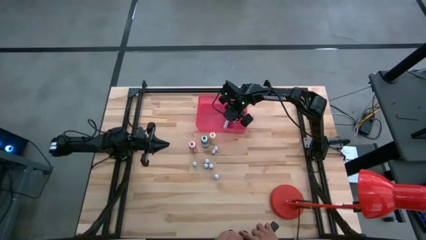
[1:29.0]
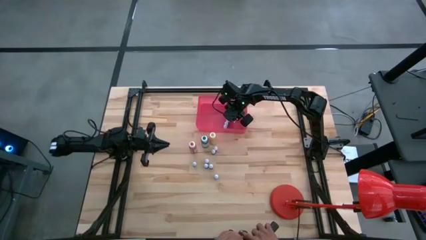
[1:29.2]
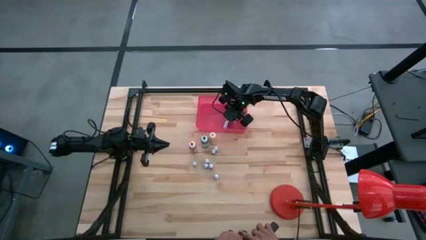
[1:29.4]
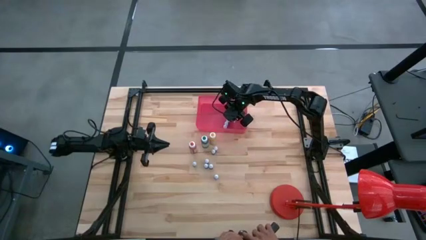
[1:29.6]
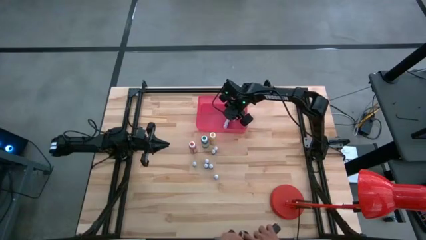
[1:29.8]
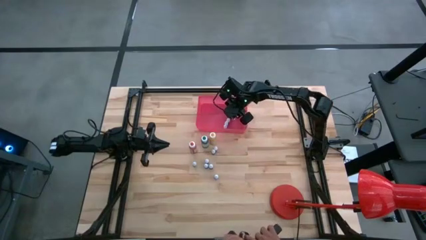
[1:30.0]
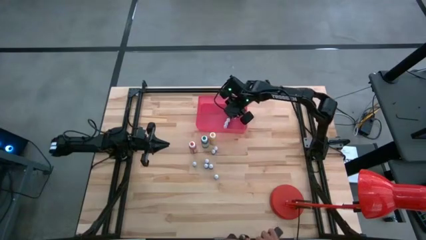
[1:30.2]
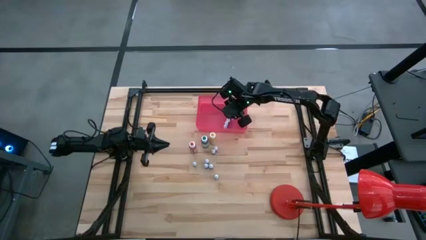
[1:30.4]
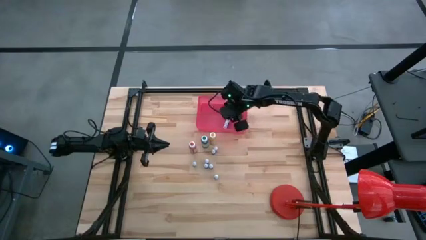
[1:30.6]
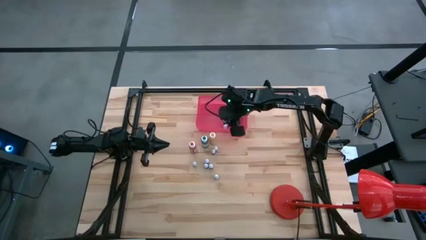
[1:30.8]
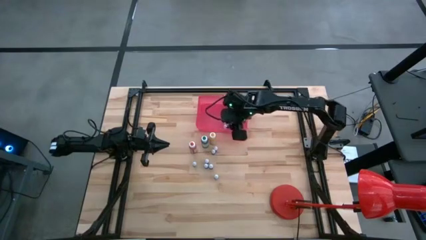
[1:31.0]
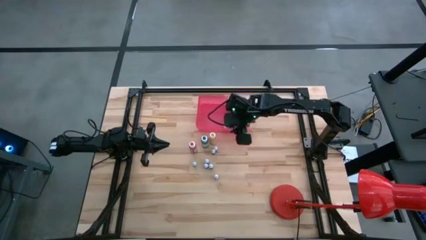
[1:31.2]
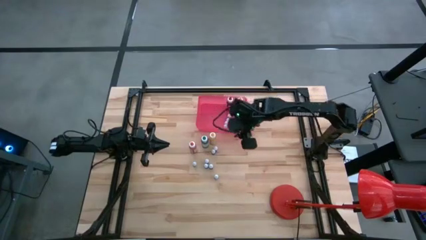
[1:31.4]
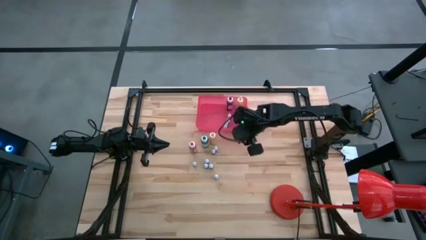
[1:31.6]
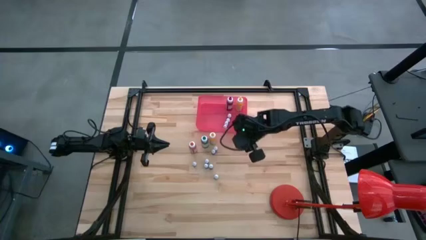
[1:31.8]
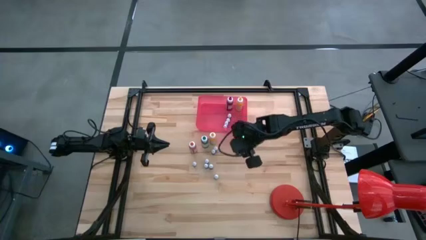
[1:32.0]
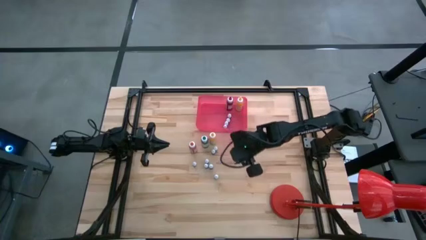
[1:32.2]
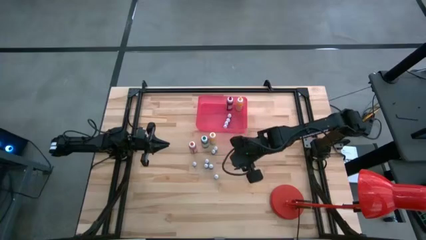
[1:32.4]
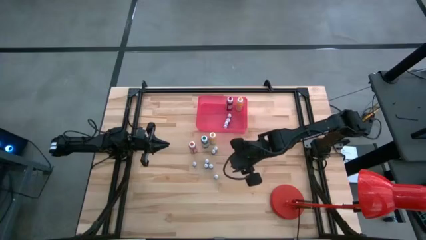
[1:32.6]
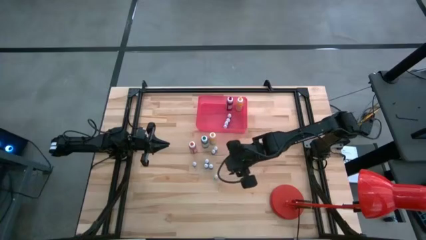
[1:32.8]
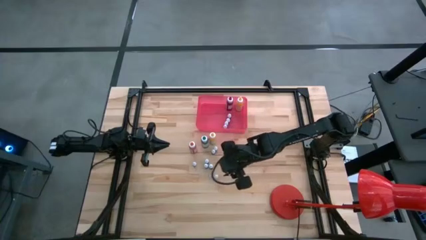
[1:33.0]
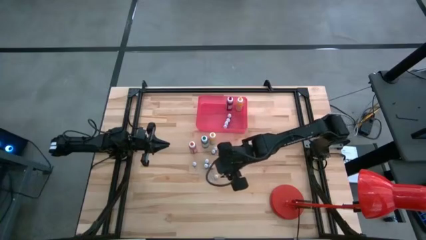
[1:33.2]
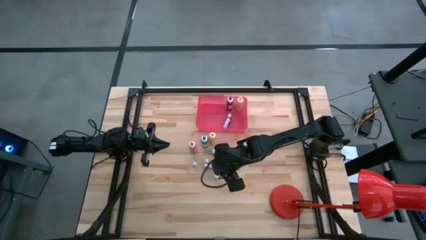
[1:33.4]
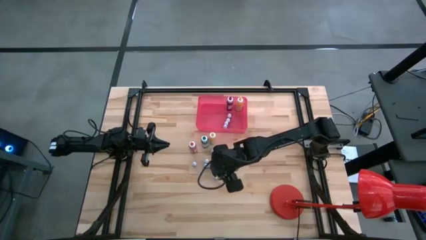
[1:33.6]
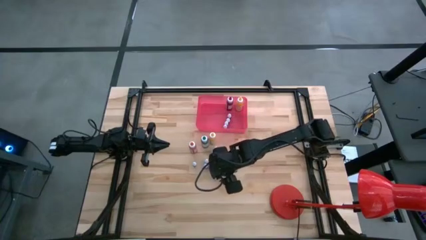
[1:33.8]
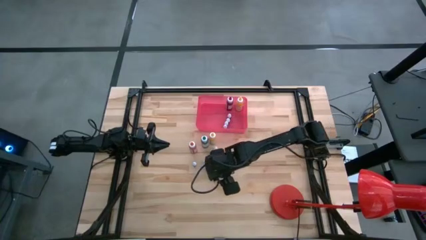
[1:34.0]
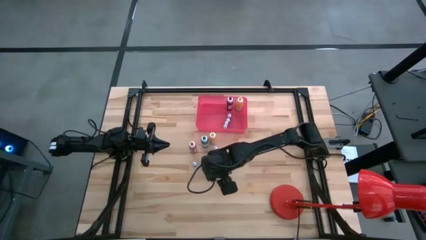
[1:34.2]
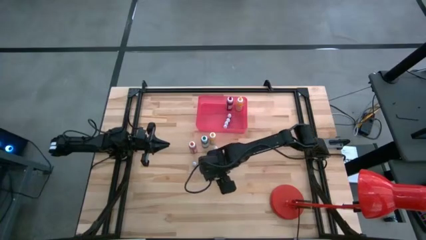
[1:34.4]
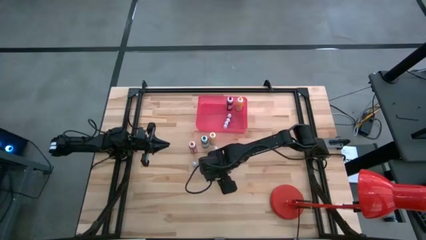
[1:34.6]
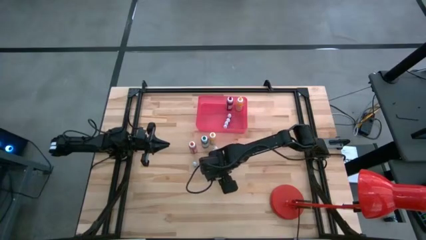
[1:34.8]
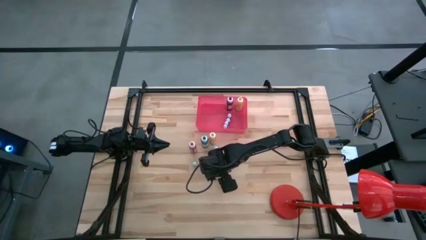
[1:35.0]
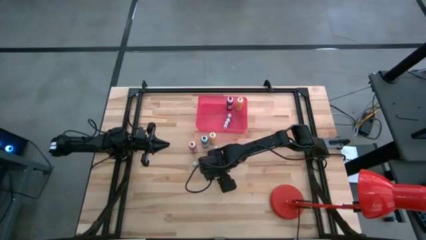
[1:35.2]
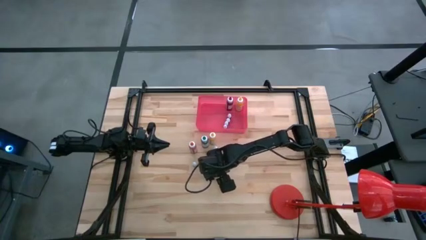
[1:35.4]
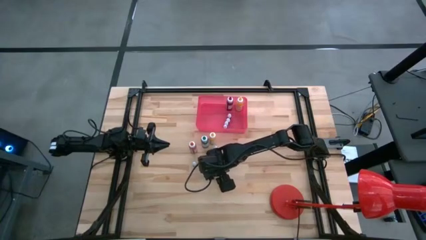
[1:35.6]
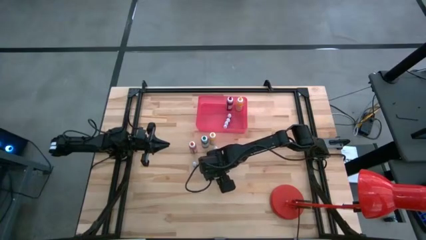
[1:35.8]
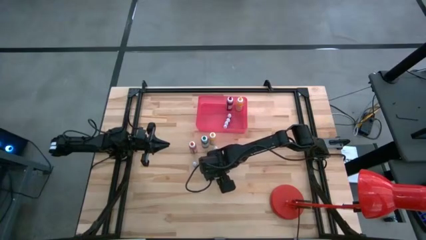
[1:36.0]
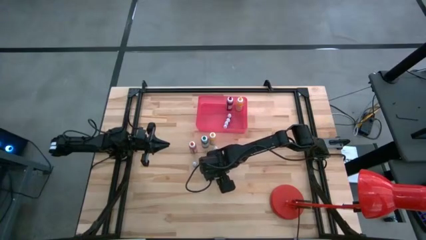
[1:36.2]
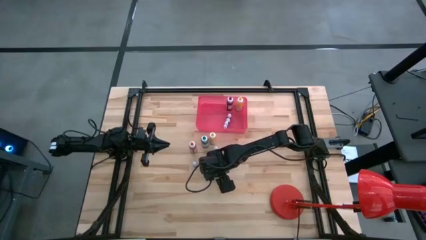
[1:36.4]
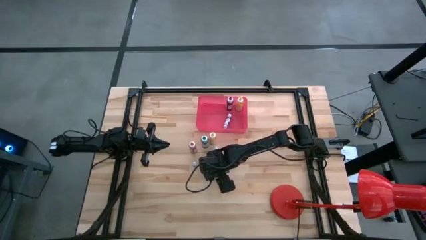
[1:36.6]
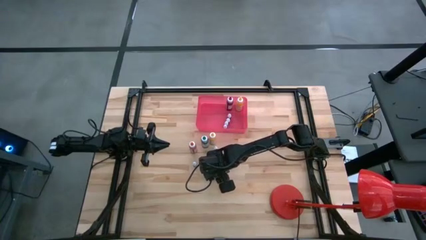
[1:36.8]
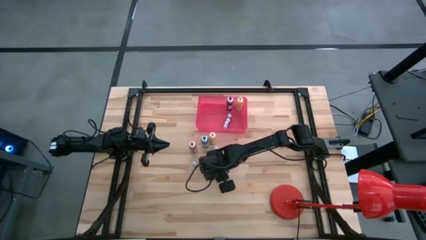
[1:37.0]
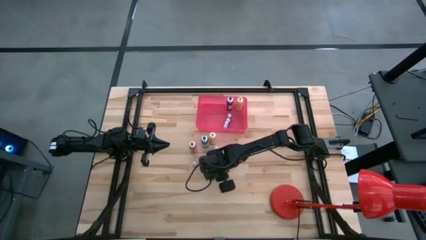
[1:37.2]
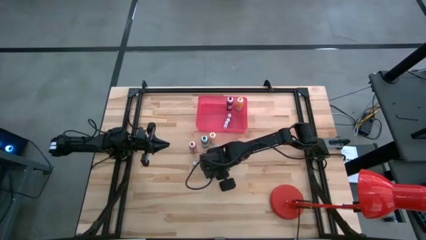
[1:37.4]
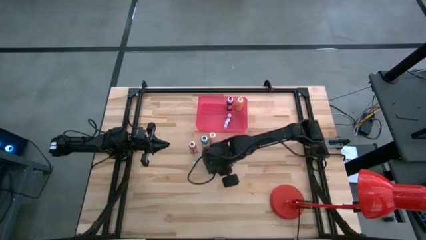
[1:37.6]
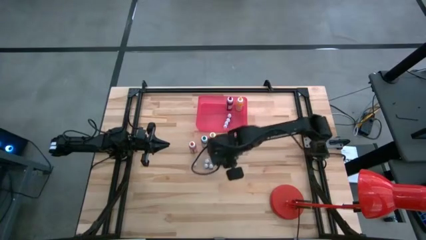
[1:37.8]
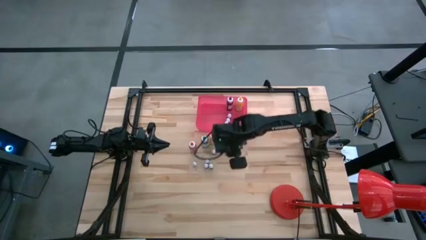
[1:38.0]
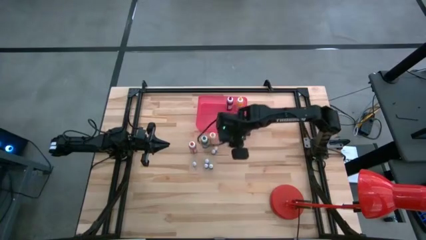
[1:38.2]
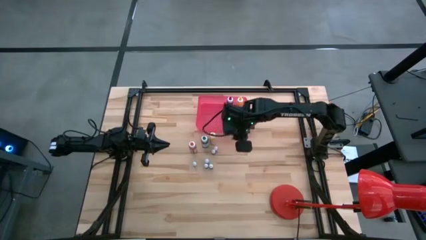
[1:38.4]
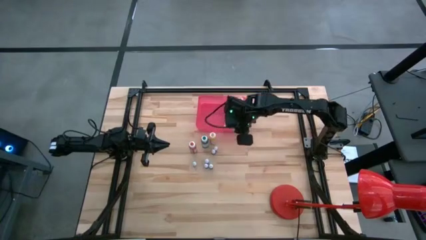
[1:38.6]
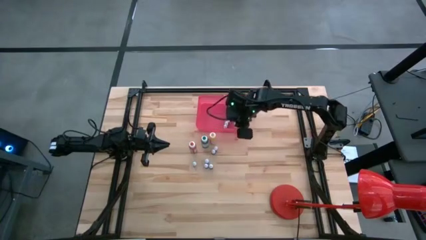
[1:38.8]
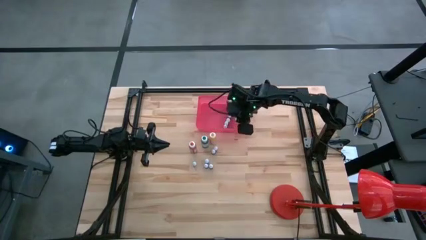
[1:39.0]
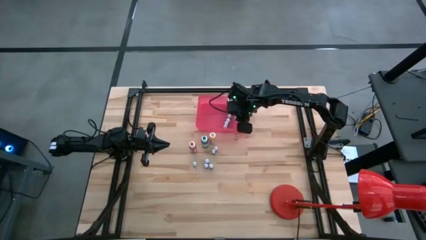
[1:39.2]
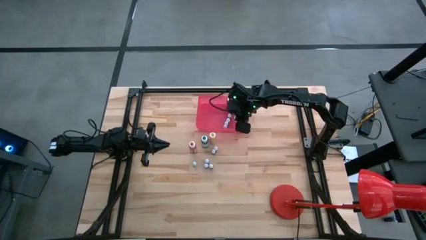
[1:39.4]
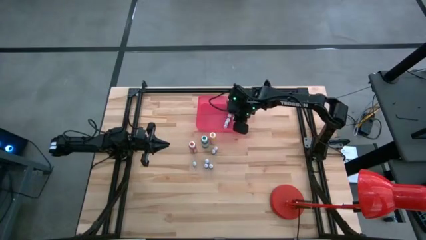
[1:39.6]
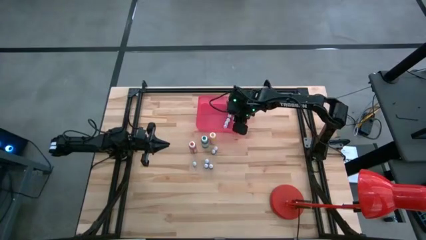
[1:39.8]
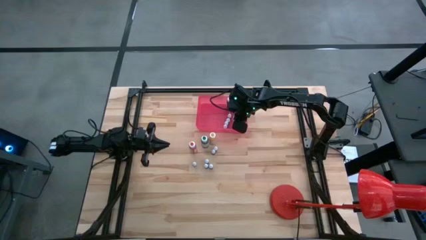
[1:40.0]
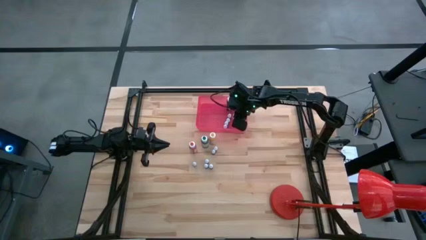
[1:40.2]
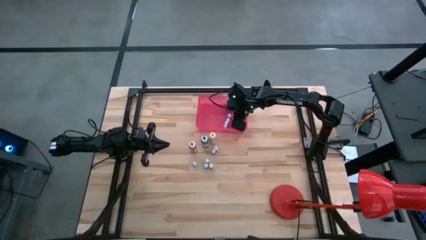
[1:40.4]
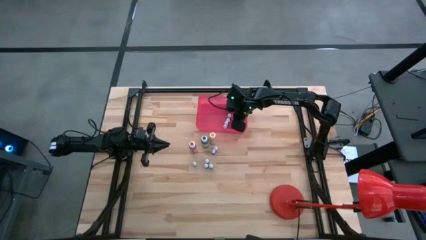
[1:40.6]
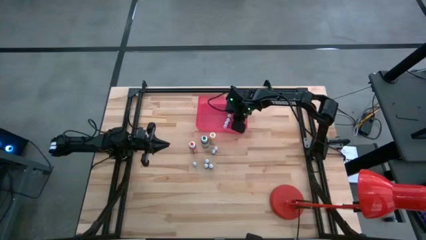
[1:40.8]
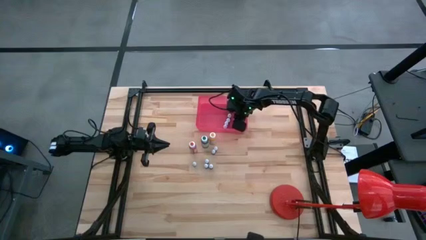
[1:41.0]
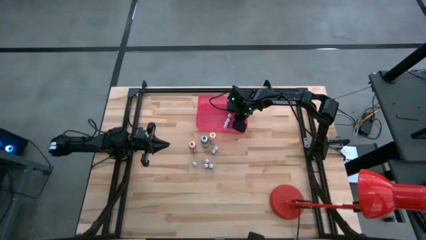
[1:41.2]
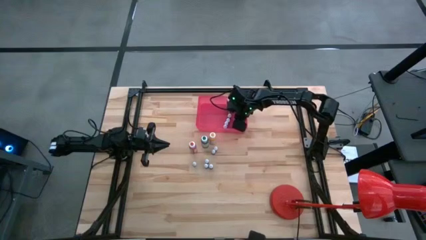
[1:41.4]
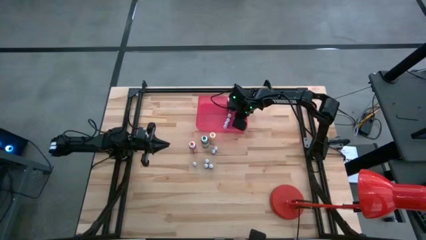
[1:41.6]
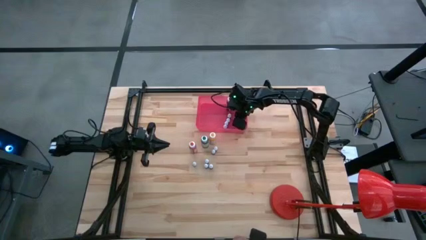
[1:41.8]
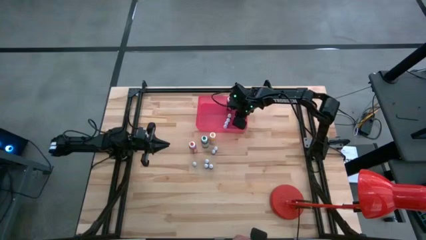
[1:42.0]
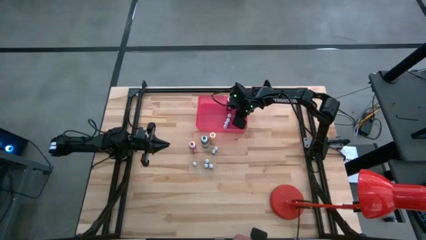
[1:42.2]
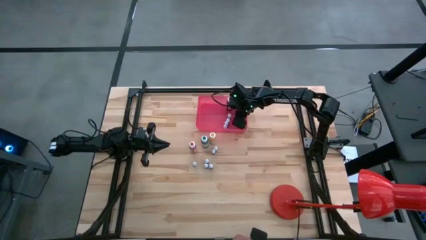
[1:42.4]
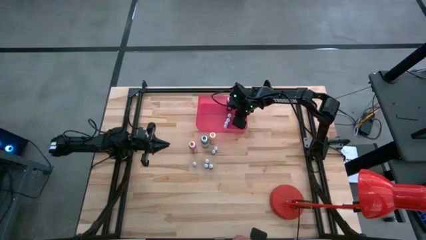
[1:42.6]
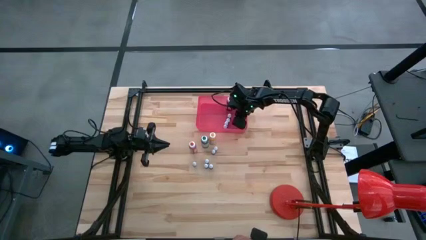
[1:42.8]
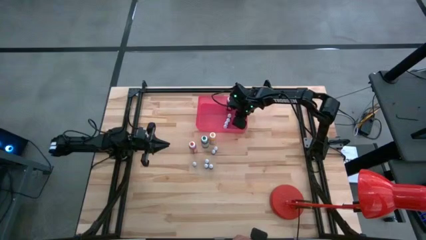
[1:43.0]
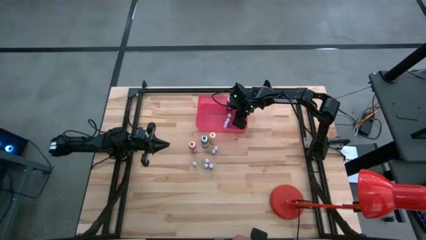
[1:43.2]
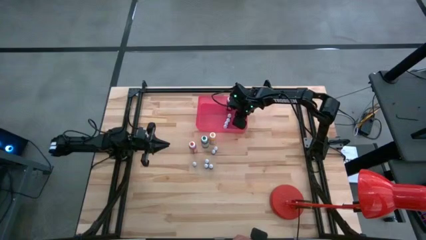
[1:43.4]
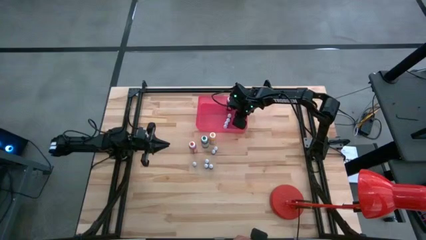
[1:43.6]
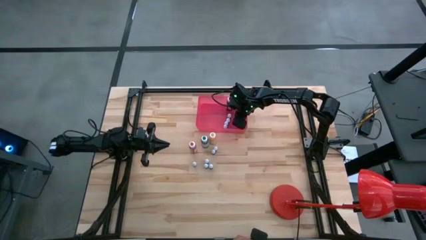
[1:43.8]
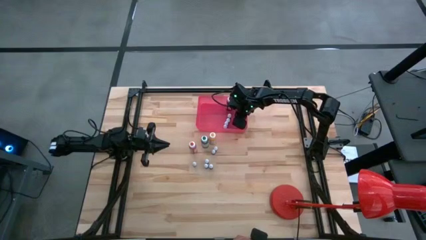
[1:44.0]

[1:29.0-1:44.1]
Task: Pick & Place food coloring
Put the small purple food coloring bottle into the pink bin
